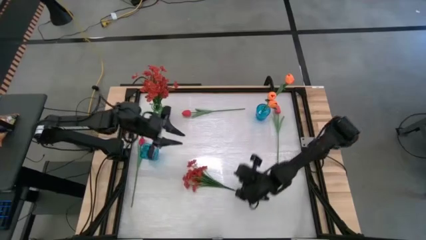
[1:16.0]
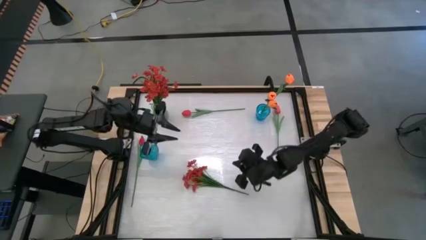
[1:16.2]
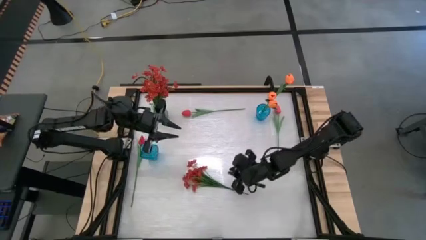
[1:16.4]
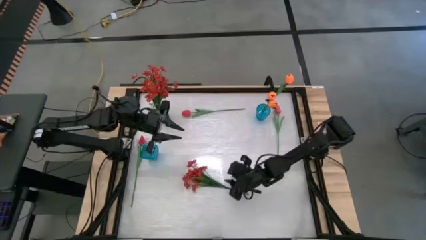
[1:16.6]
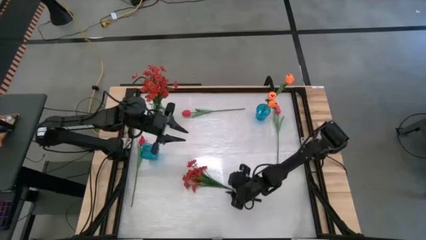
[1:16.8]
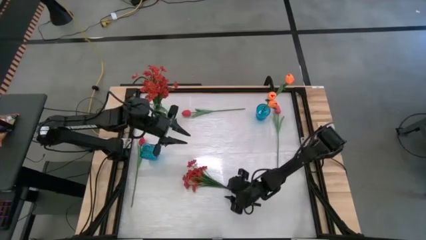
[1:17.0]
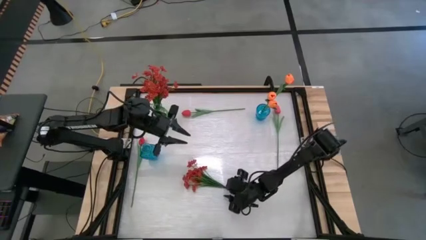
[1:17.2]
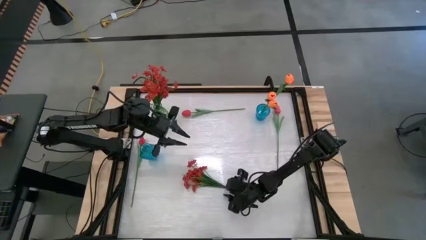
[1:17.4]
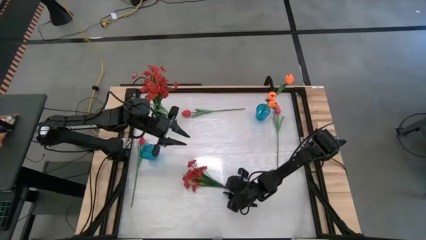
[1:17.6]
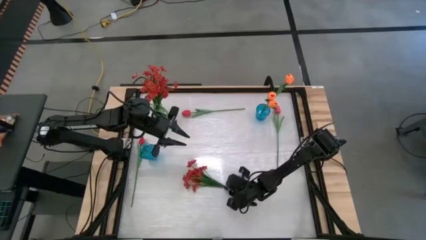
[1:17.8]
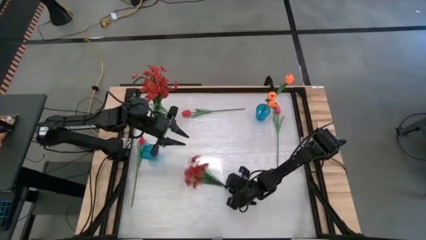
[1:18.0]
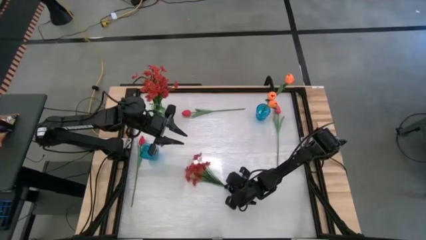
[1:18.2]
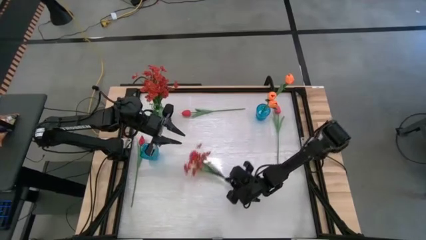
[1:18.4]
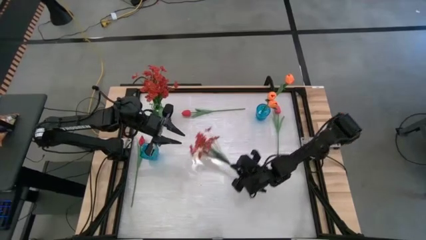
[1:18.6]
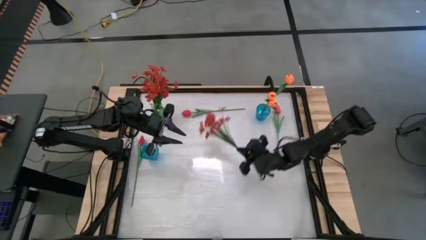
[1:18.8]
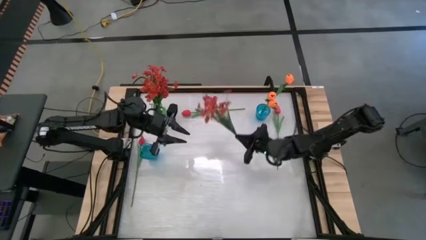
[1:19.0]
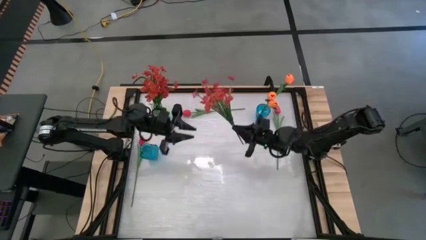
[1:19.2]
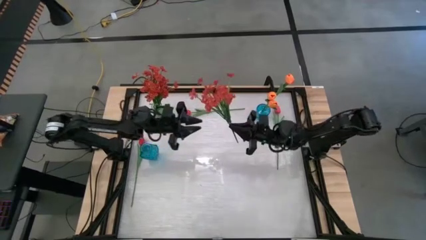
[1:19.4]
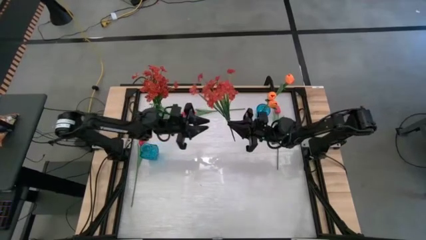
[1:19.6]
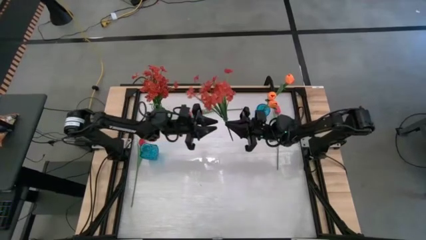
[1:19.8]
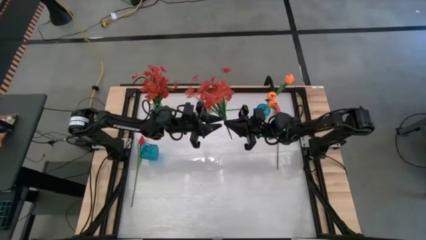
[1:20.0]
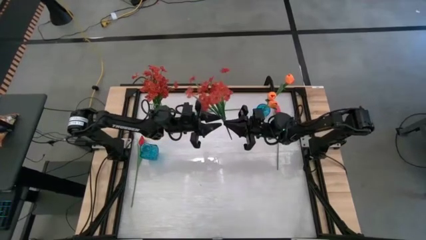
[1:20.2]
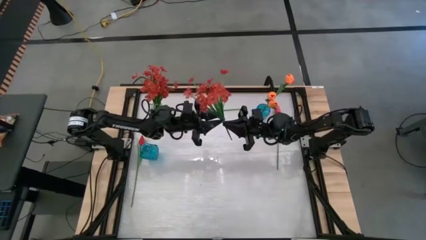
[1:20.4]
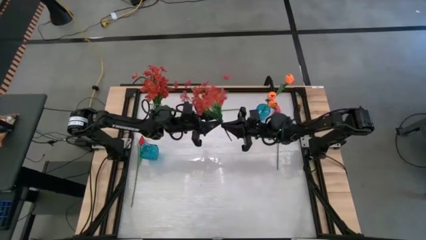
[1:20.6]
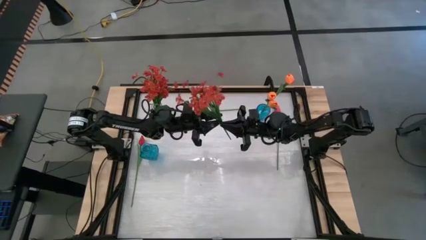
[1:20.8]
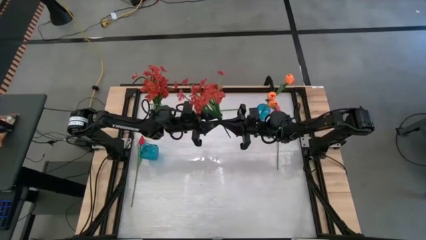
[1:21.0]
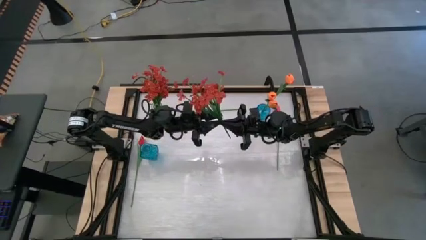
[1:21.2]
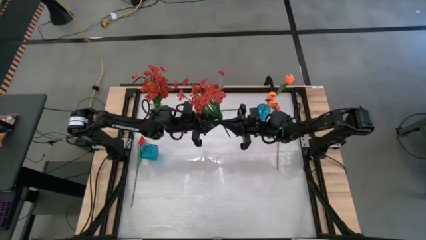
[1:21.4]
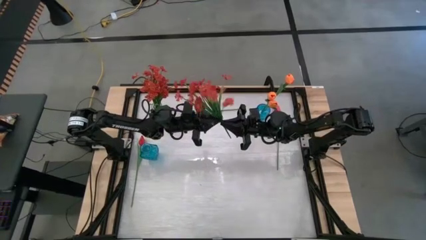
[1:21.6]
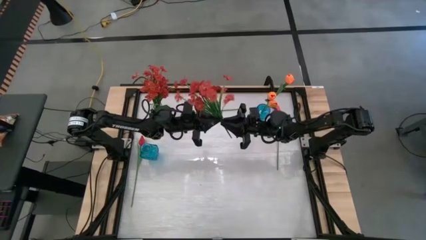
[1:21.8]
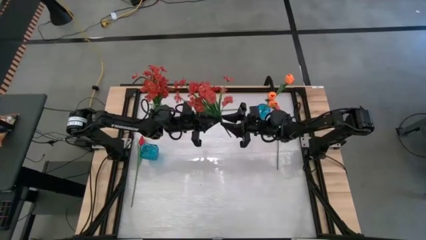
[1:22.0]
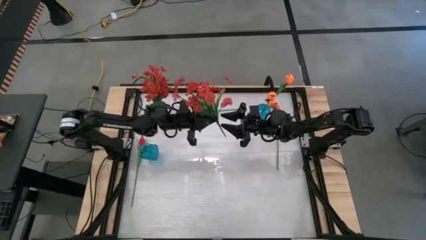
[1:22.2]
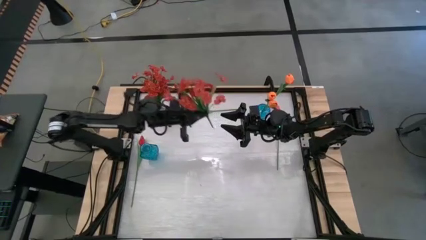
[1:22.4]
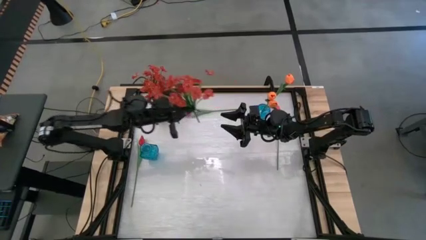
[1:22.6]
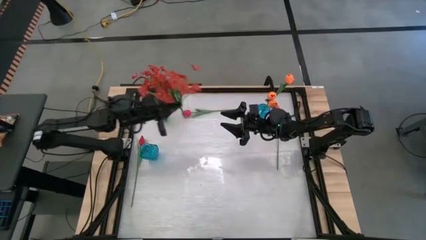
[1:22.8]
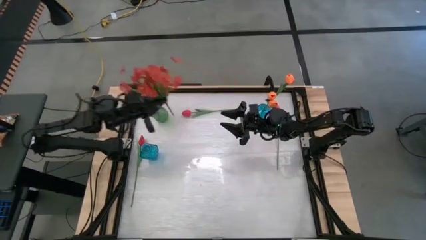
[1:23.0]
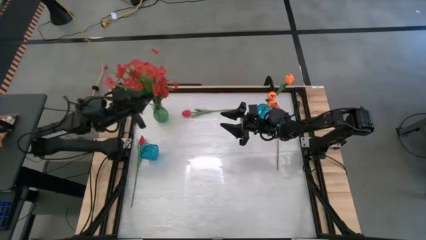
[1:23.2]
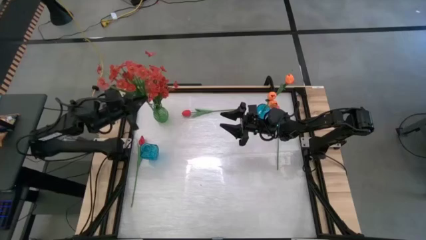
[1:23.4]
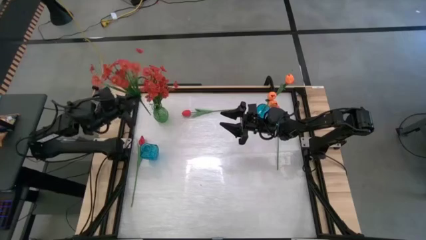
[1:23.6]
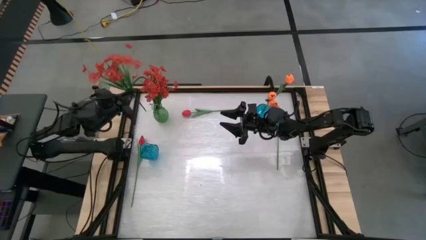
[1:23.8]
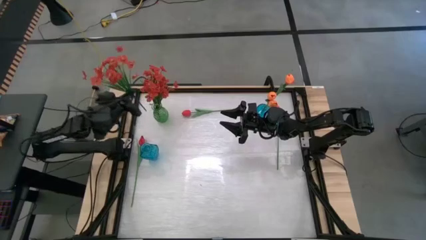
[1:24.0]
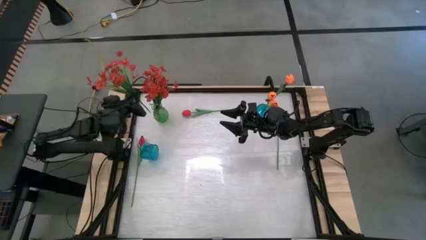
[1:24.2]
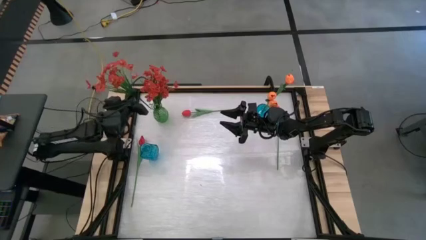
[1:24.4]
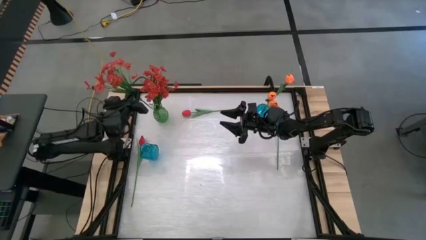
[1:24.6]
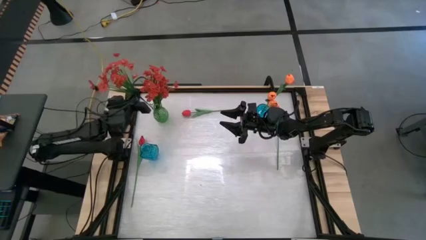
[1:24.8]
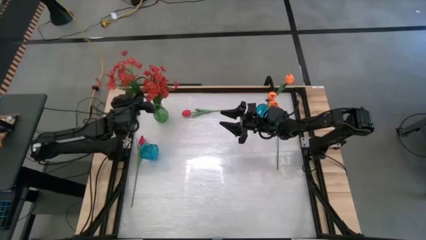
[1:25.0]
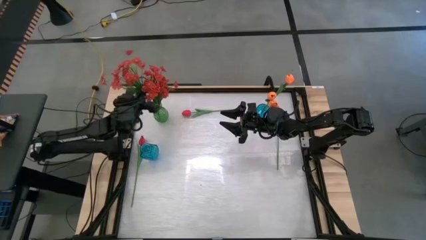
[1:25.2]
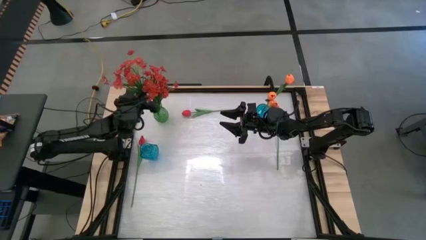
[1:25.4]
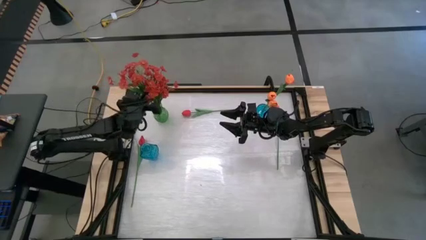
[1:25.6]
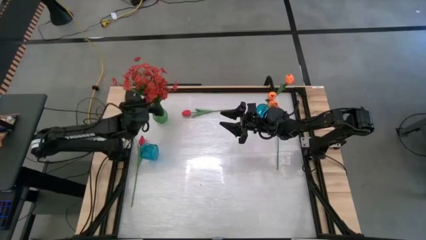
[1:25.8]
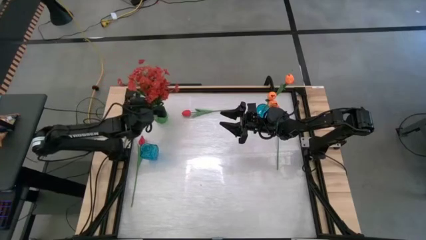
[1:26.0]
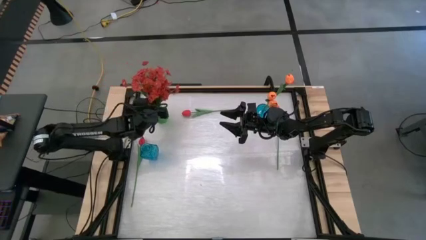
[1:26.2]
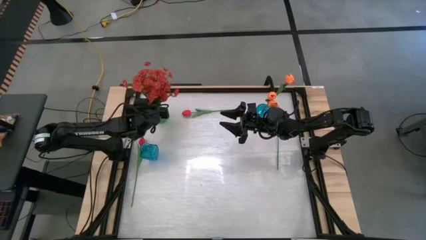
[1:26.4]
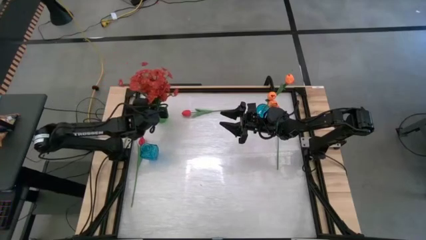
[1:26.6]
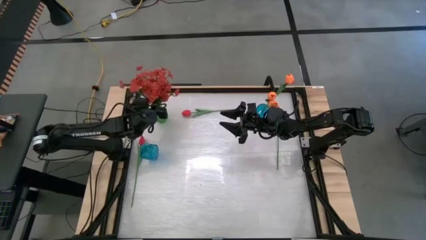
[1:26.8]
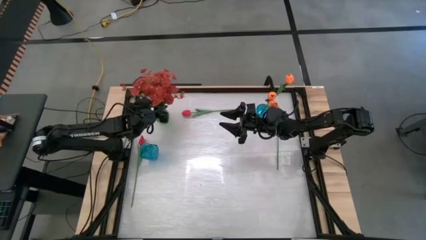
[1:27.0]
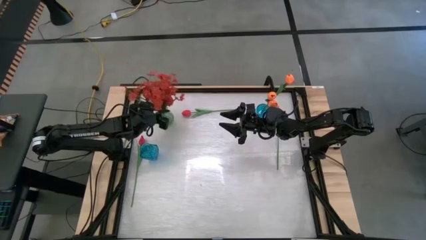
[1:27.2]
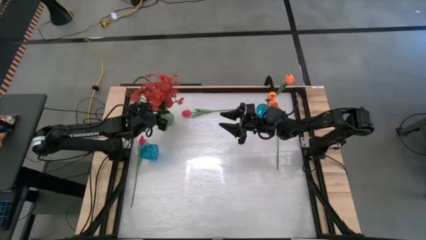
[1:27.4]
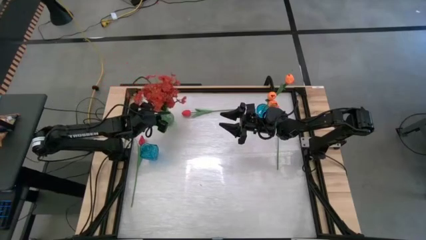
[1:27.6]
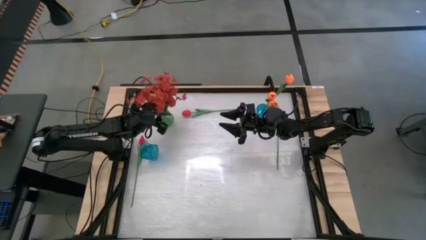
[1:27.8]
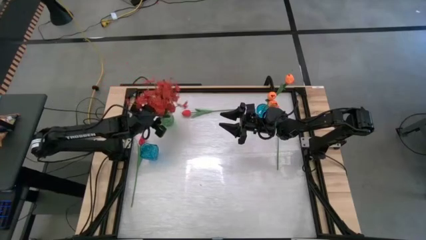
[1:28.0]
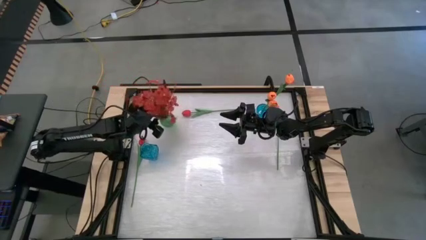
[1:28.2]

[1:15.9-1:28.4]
Task: Sort flowers into vase by color
Put the red flowers into the green vase
